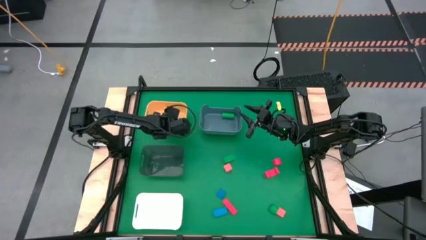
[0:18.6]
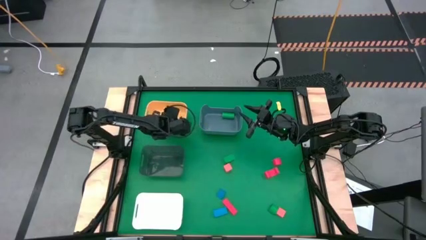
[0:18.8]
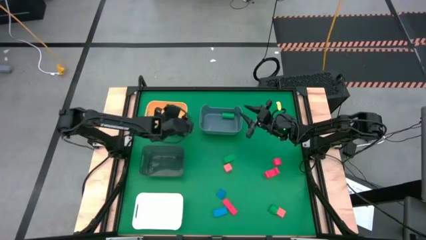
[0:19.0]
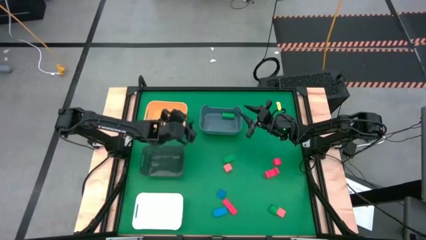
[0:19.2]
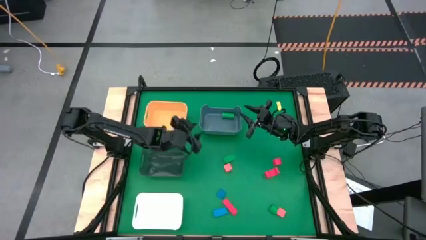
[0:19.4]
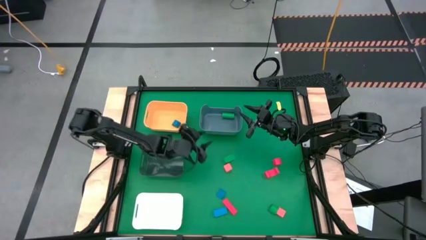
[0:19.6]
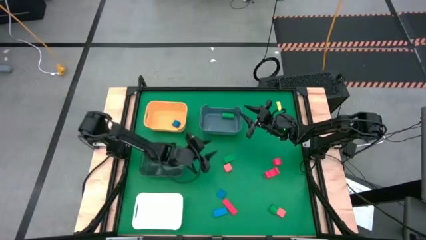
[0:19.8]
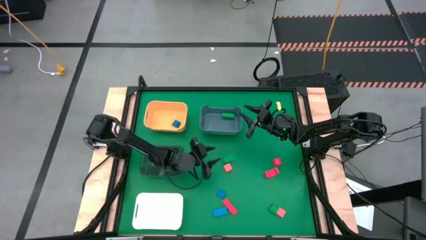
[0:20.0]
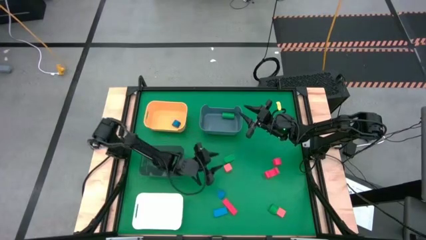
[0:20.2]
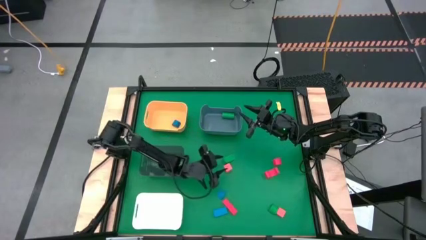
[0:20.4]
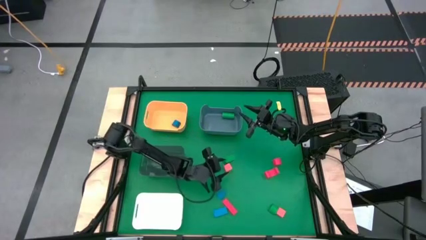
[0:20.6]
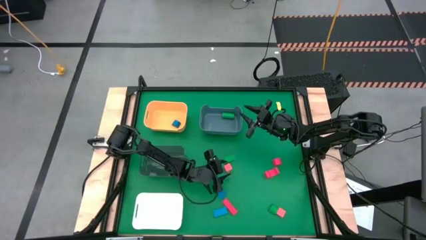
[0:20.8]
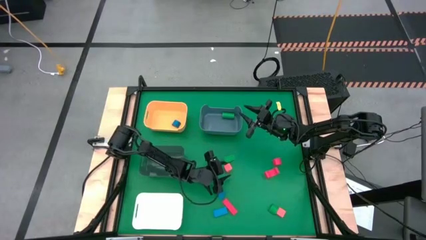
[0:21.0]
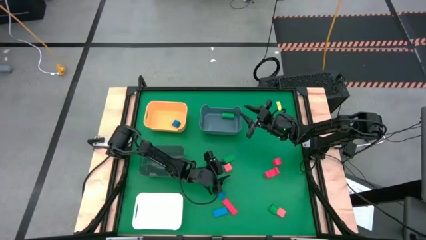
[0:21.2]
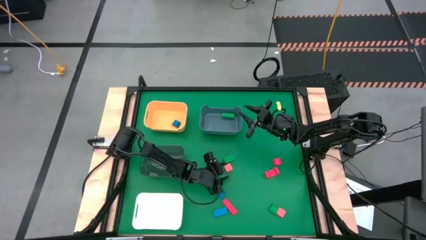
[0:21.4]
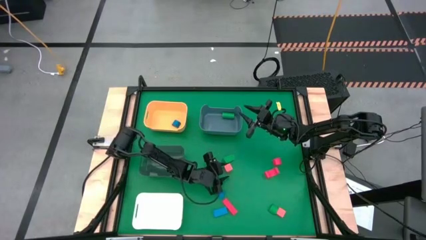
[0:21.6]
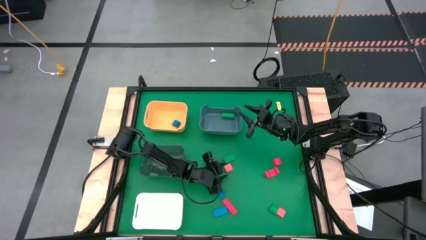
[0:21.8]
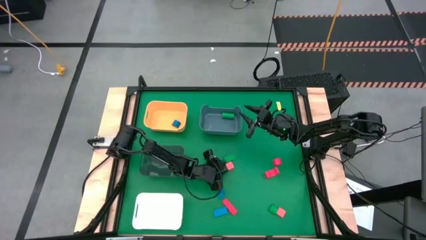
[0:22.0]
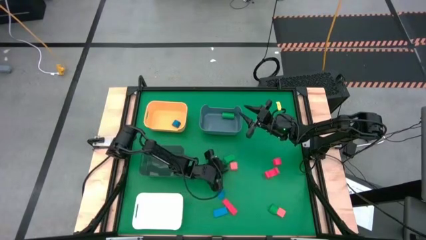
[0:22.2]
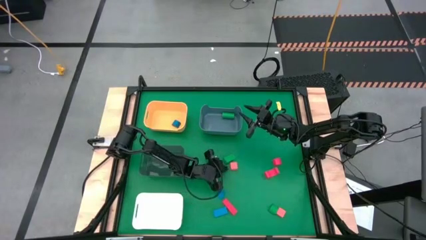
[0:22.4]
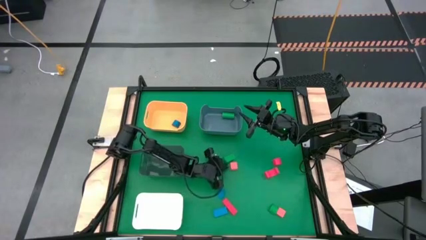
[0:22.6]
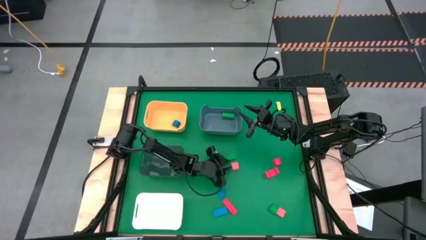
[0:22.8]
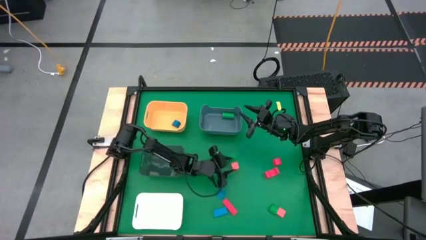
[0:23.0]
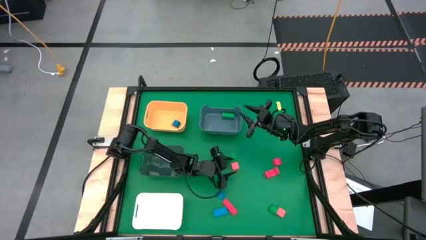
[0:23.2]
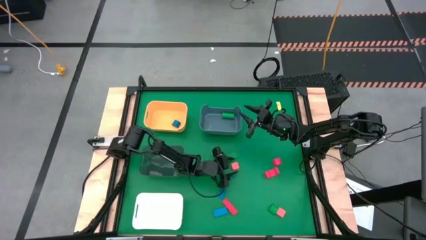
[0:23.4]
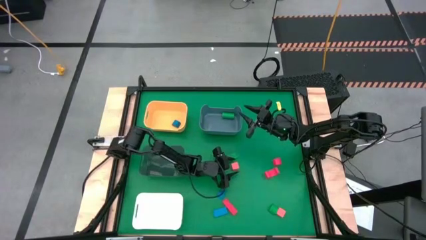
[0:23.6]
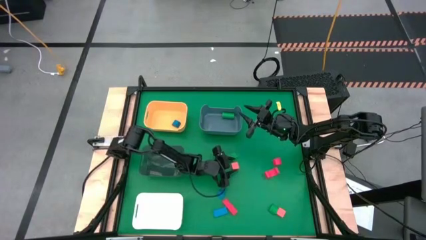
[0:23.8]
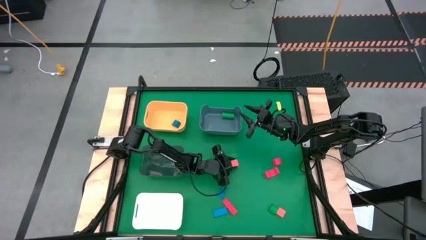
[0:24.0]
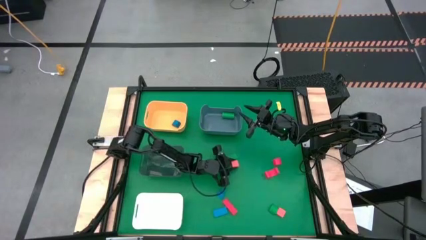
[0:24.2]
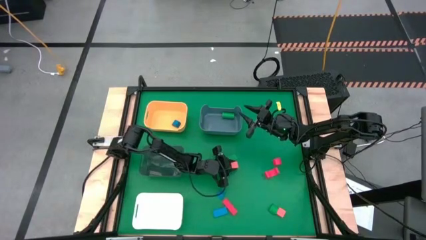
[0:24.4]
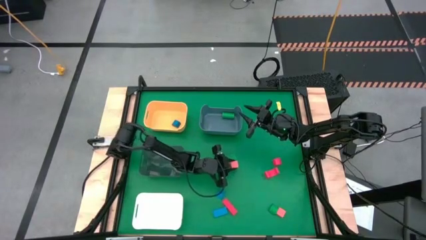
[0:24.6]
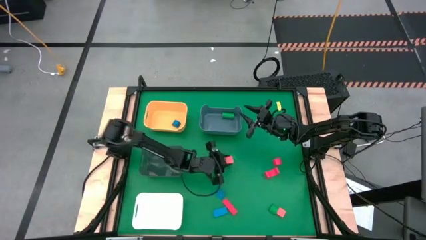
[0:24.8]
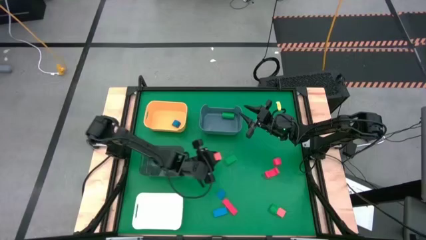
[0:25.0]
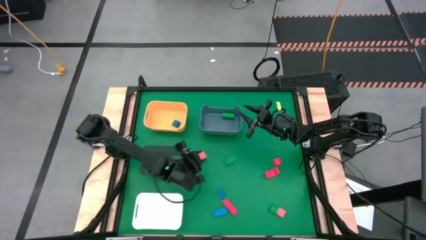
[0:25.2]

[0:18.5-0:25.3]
Task: Sort & place blocks by color
Put the orange square block into the black bin

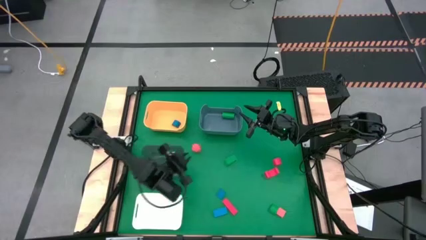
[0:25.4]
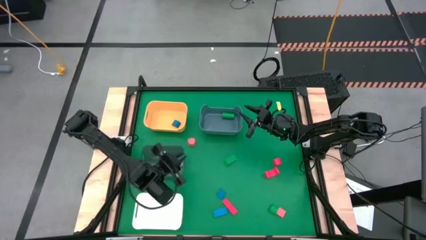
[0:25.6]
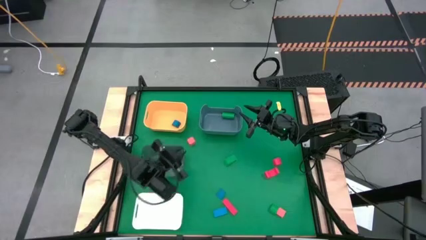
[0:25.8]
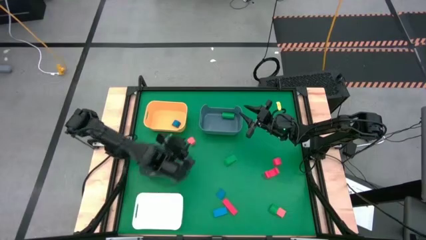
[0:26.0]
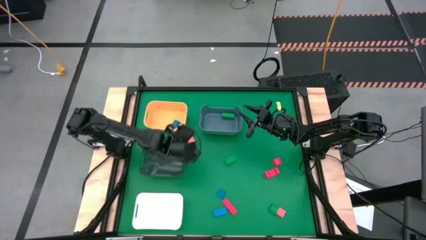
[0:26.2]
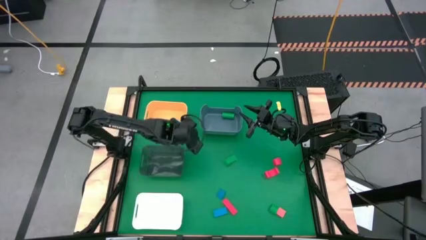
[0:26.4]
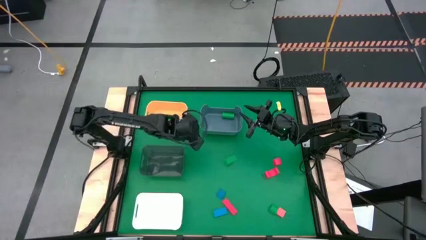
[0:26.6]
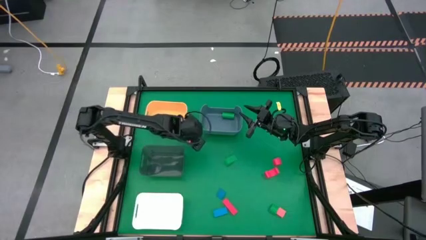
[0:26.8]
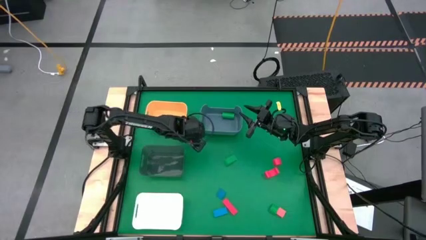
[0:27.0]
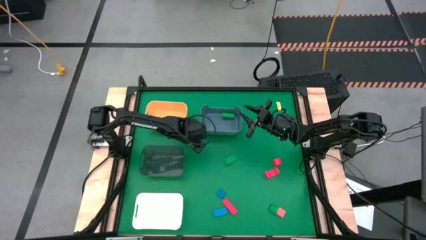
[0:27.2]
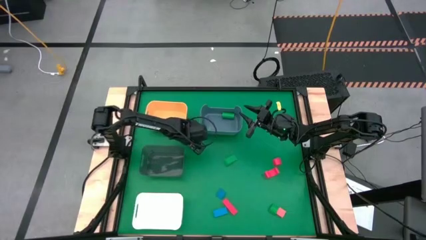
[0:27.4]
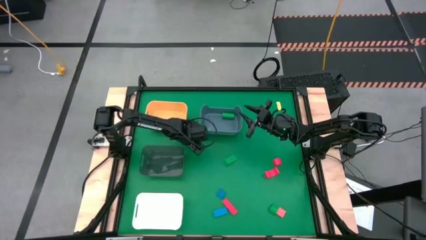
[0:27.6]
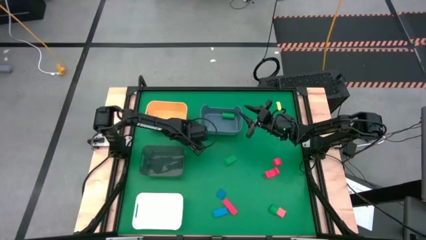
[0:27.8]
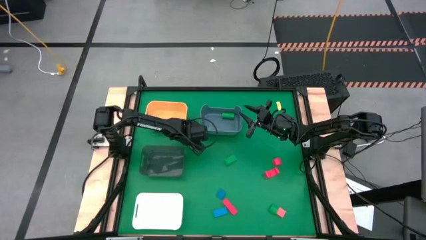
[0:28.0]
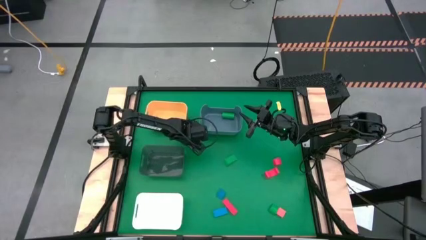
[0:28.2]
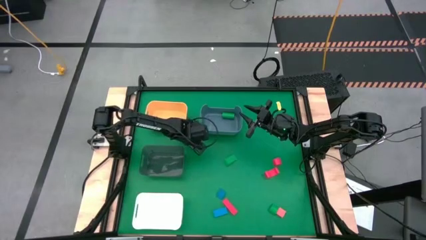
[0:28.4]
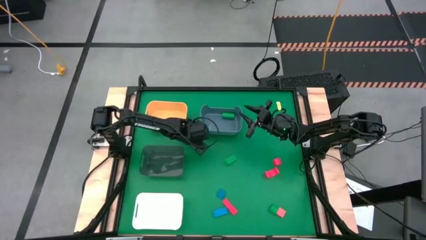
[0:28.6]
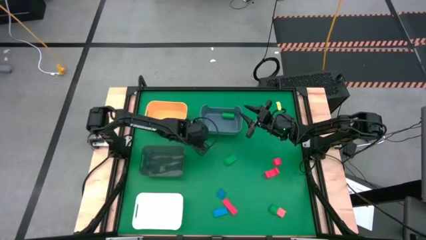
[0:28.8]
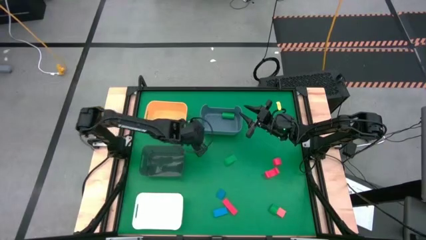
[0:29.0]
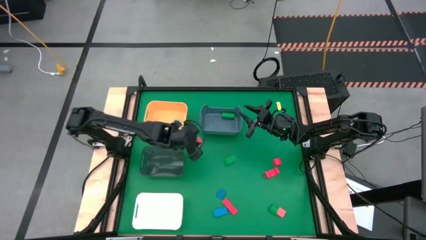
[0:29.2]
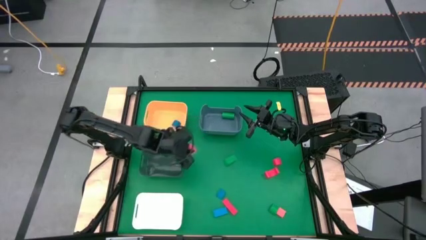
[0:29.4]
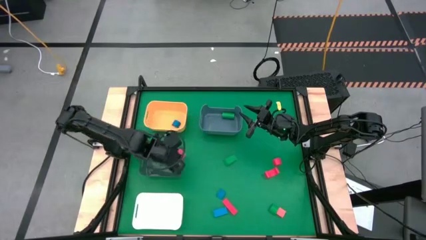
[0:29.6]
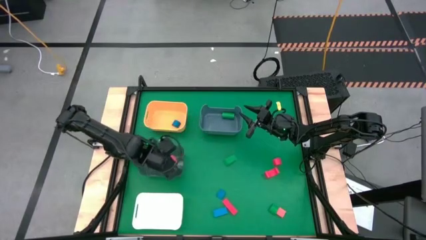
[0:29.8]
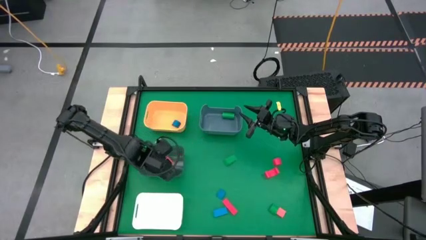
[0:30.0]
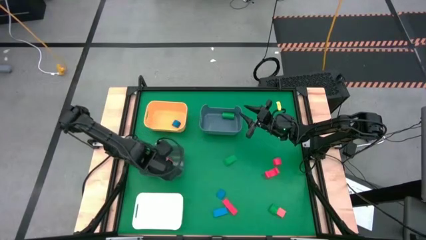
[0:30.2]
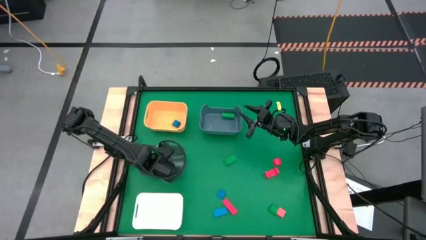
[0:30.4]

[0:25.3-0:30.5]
Put the orange square block into the black bin

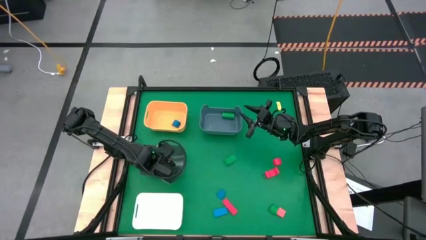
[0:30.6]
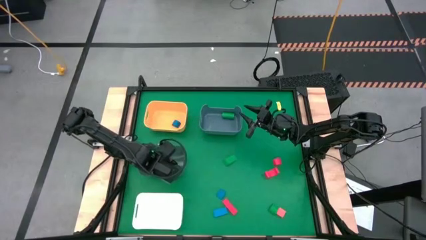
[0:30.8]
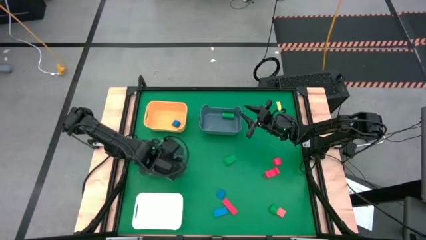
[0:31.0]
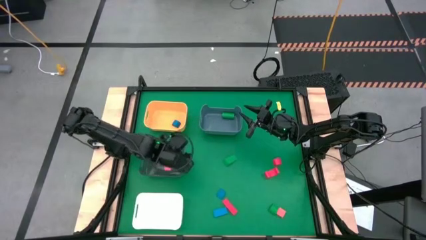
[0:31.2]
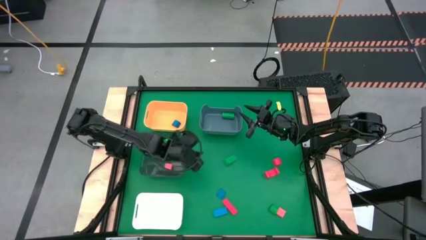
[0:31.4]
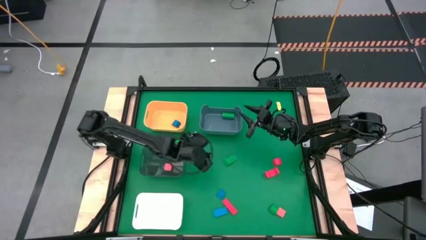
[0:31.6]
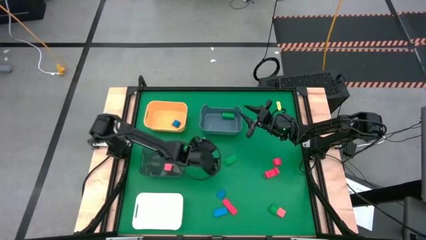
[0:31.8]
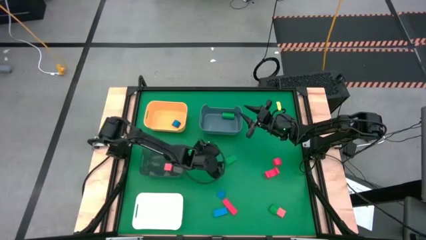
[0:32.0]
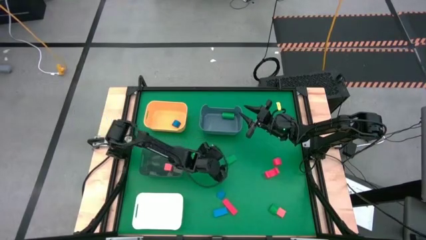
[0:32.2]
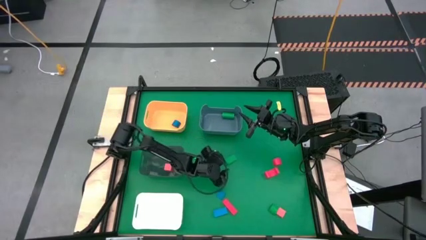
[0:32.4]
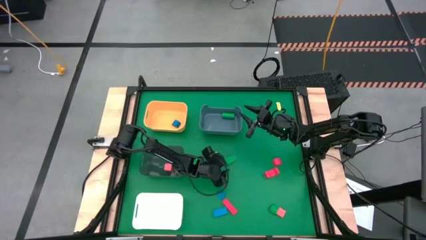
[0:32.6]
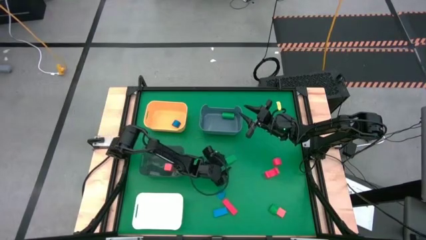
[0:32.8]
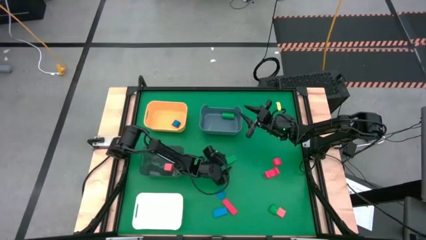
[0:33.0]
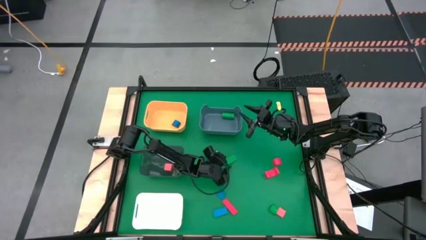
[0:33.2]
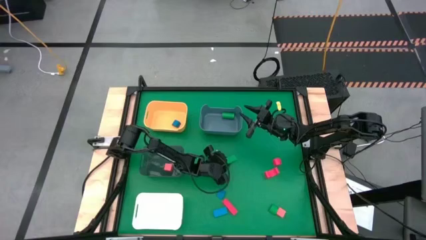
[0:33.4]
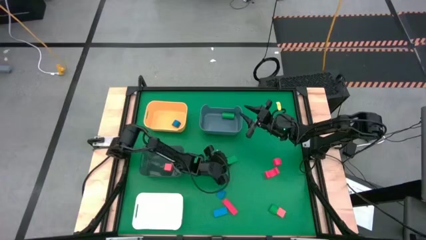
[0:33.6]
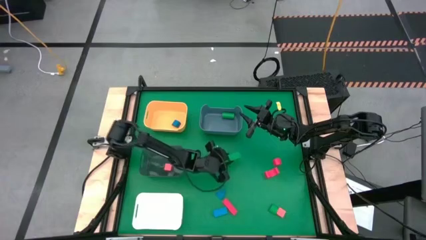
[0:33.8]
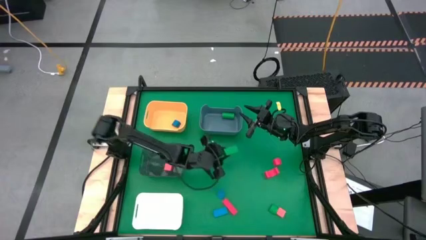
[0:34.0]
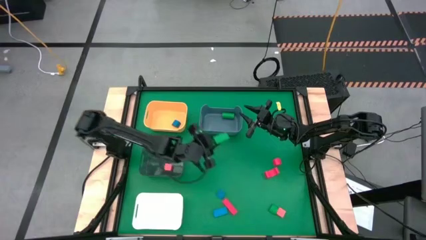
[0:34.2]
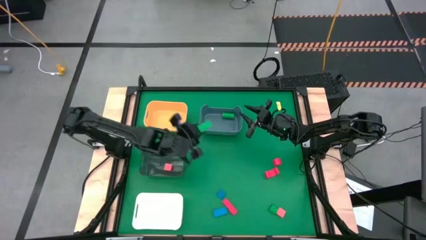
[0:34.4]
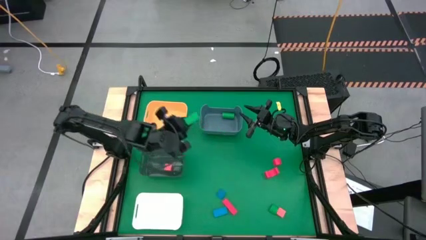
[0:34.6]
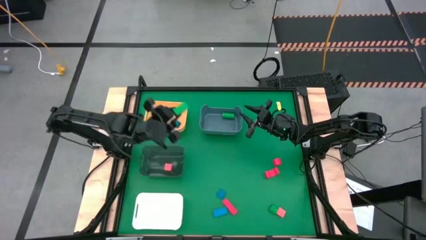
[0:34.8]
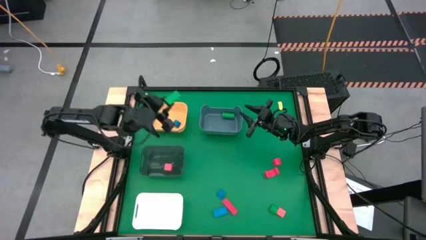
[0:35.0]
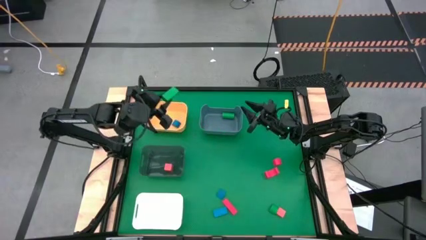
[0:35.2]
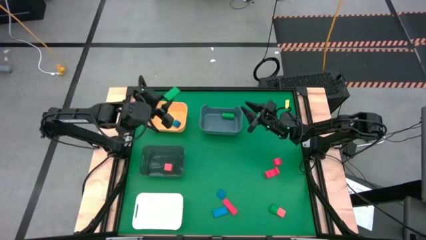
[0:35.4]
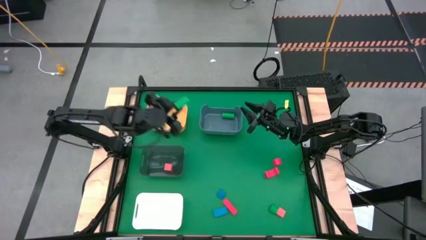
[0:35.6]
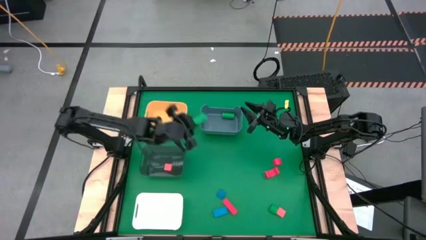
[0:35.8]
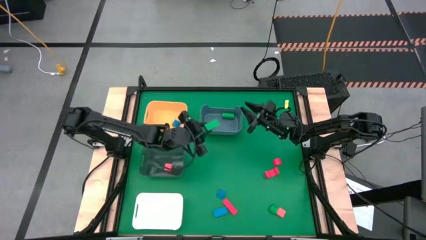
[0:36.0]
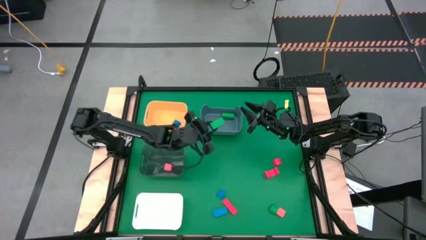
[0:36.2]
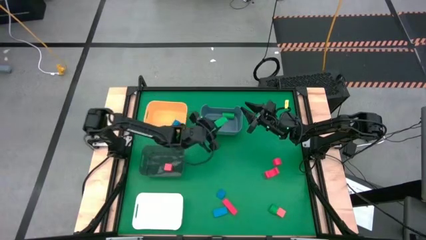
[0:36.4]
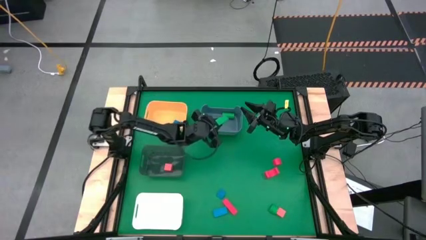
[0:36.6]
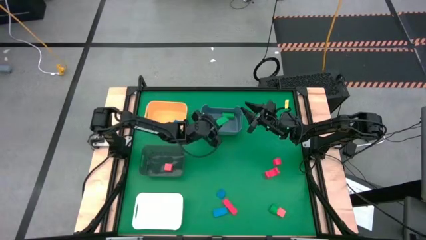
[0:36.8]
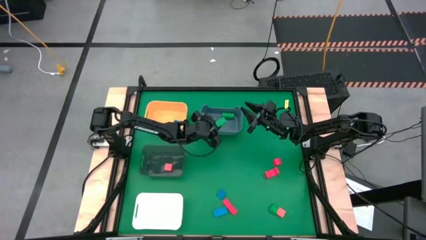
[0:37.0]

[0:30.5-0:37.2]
Put the green triangular block into the blue bin
